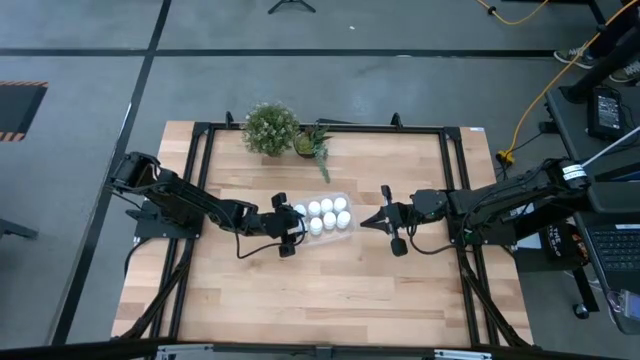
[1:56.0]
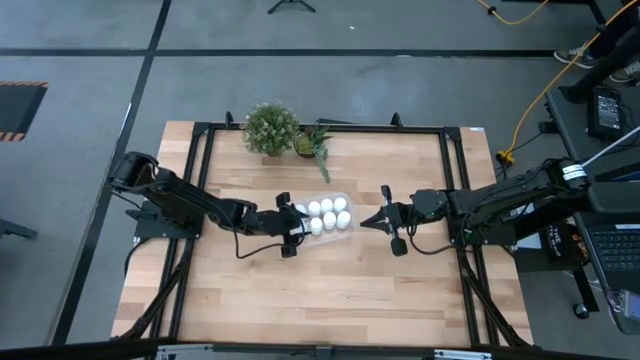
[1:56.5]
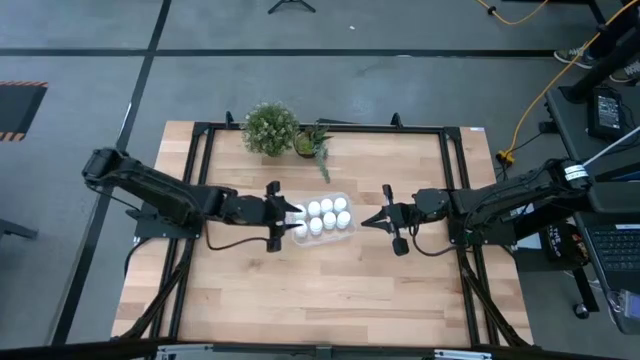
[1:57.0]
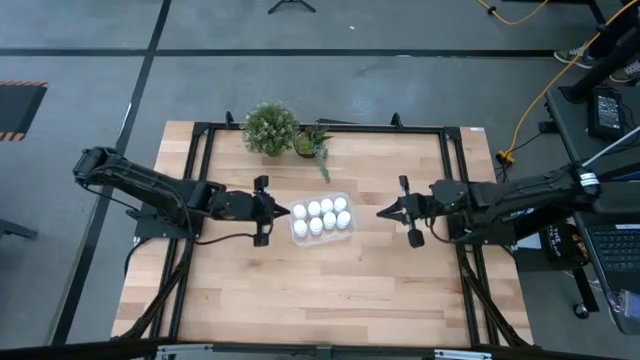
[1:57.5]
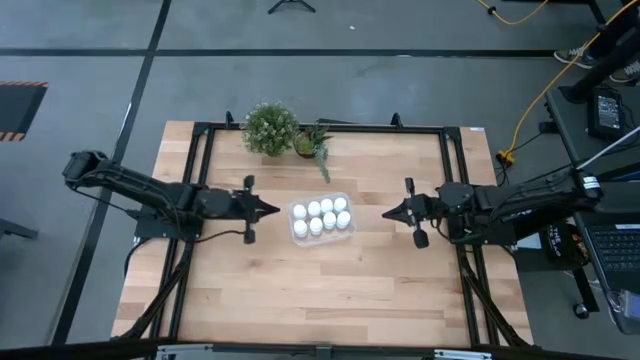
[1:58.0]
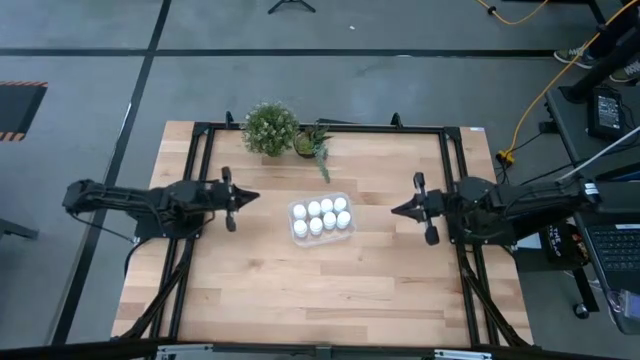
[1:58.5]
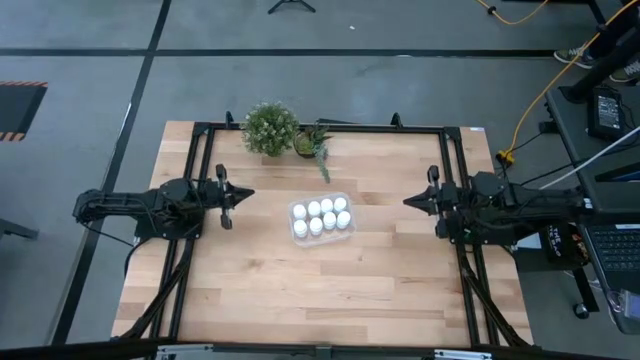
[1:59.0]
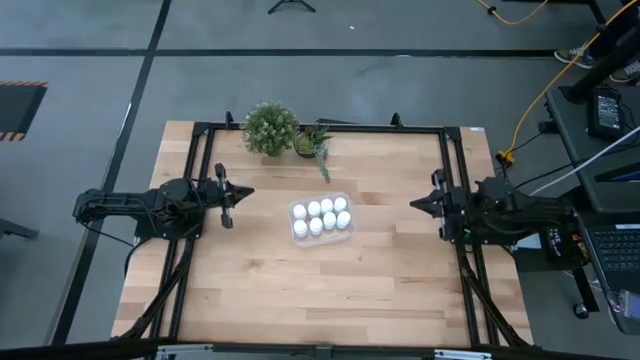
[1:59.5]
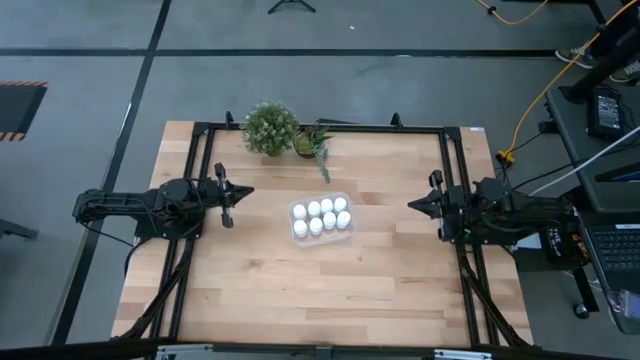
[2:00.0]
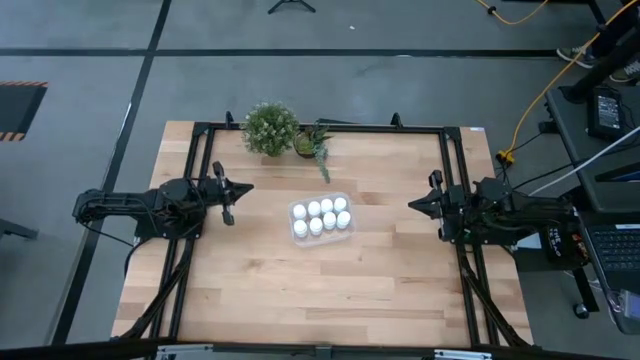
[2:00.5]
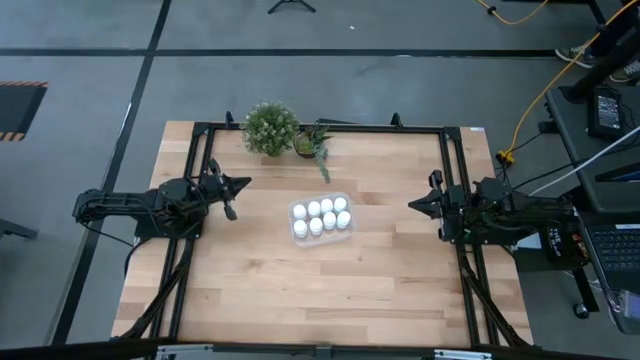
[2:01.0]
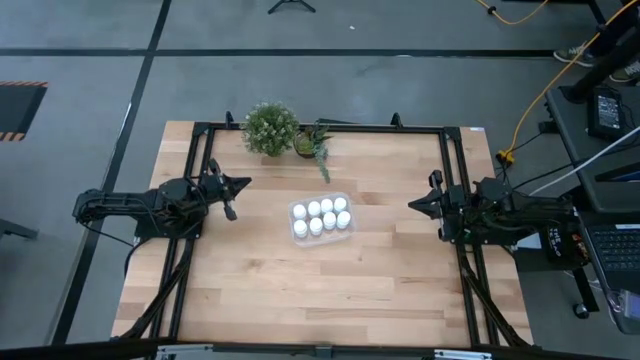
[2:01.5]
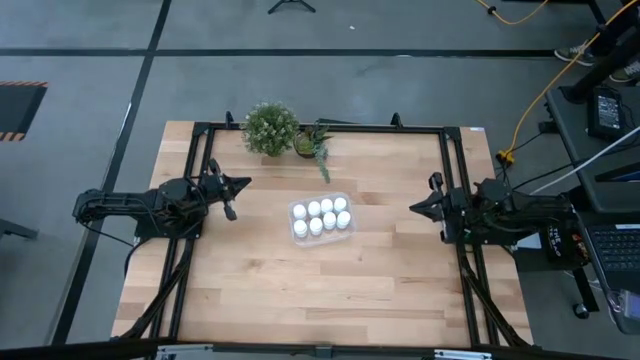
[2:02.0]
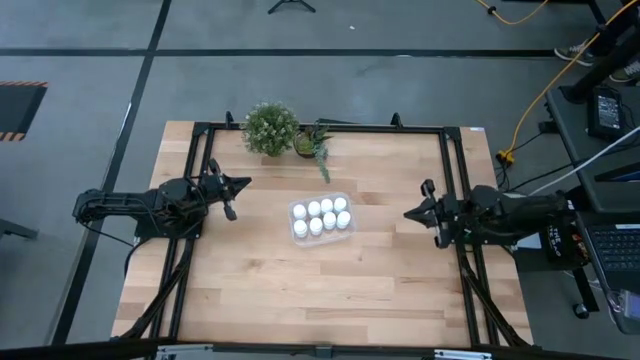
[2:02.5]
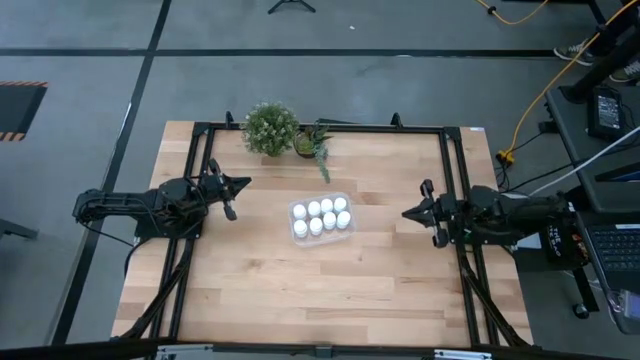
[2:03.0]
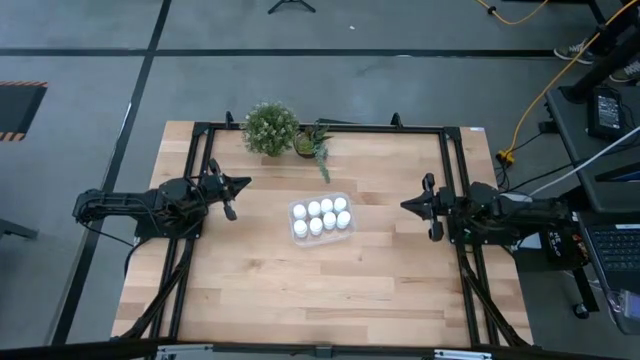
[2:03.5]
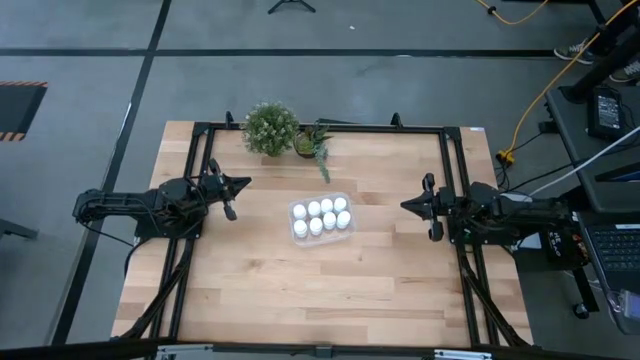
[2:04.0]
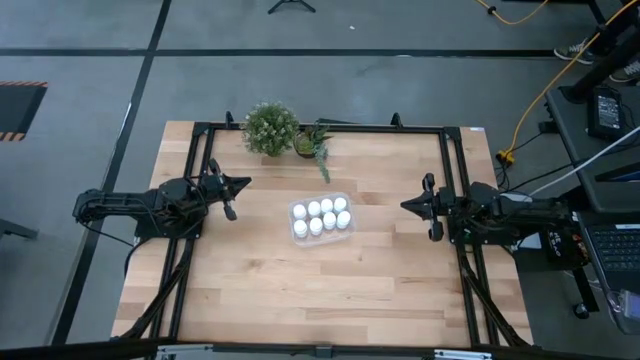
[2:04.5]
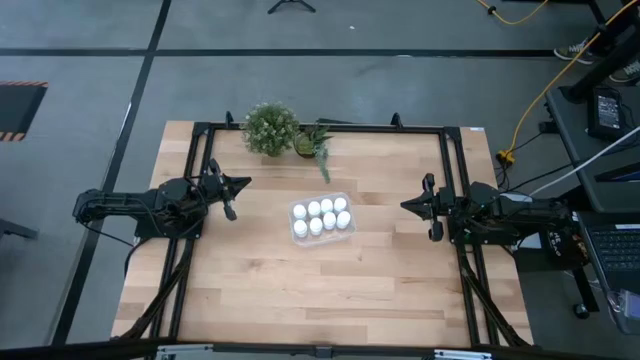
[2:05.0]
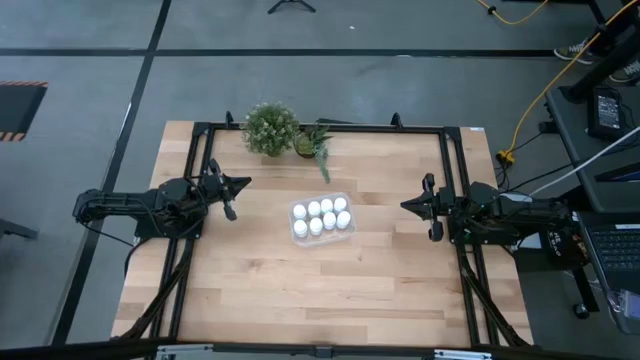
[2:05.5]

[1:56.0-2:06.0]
Task: Pick and place pill bottles into a basket
Return to Home Position

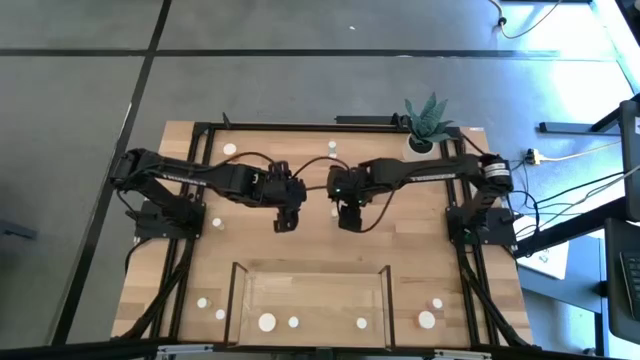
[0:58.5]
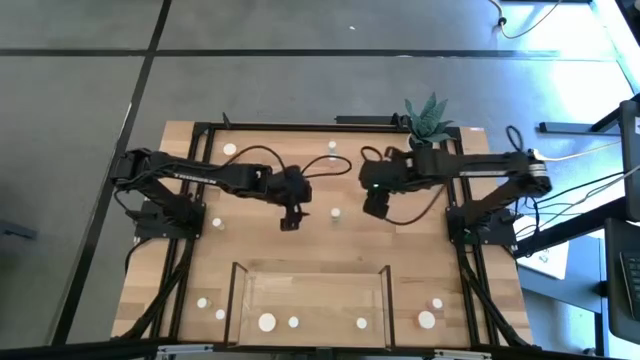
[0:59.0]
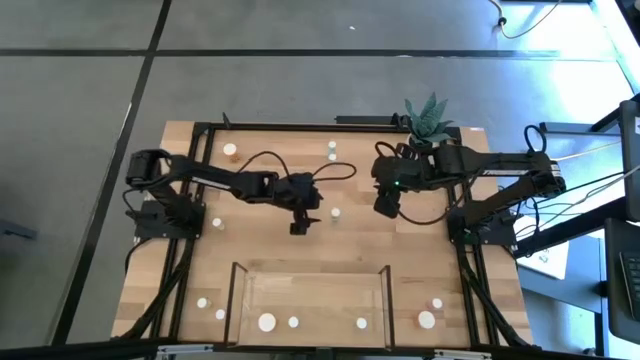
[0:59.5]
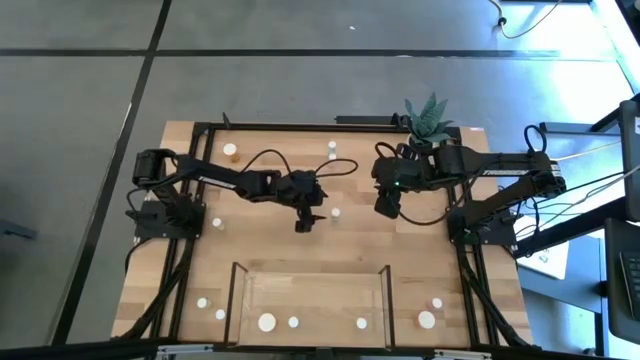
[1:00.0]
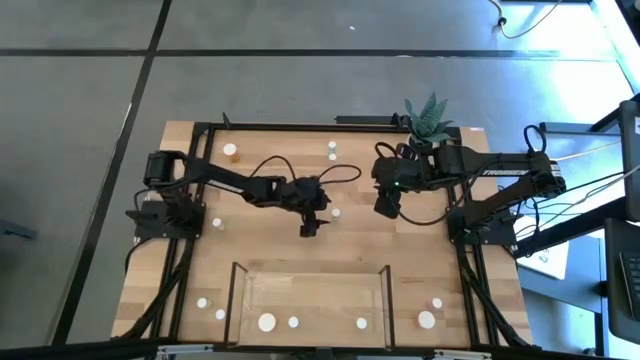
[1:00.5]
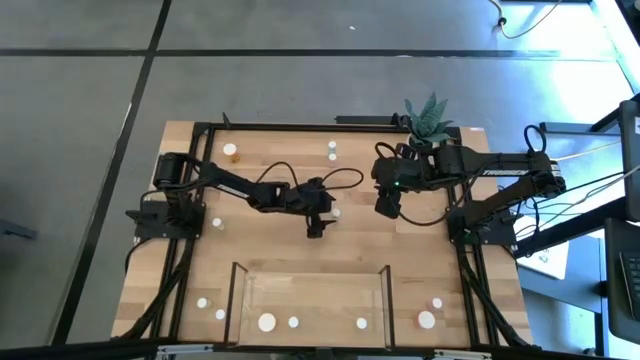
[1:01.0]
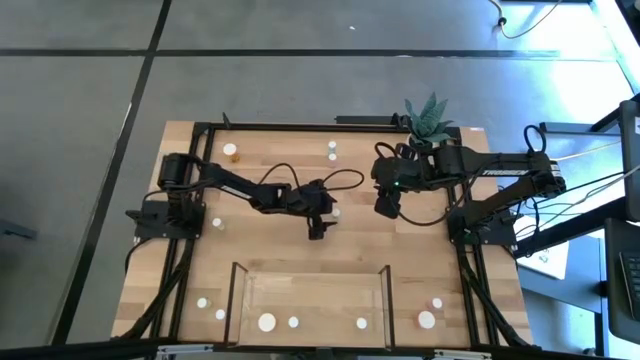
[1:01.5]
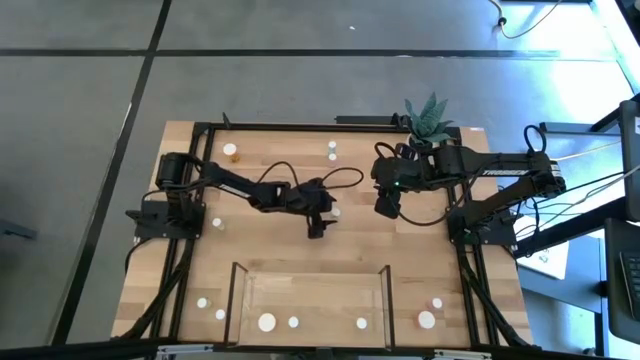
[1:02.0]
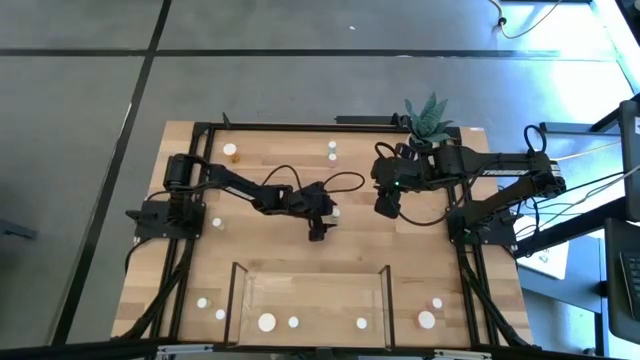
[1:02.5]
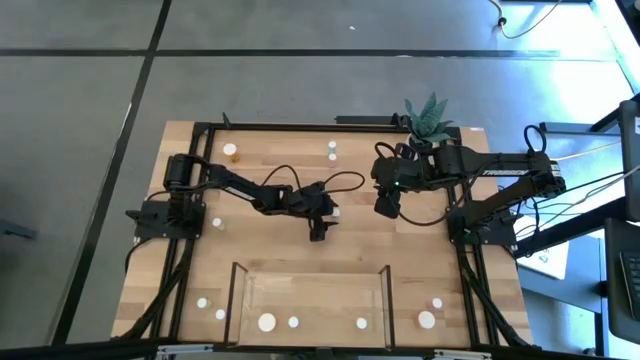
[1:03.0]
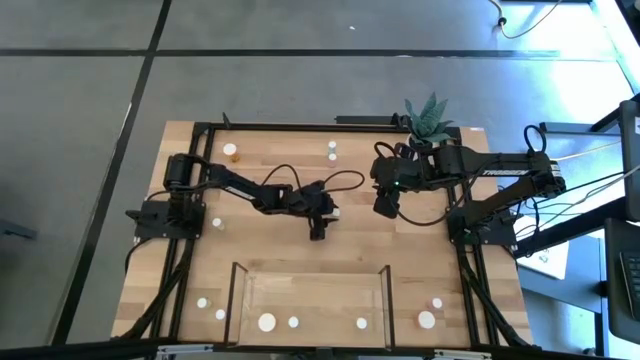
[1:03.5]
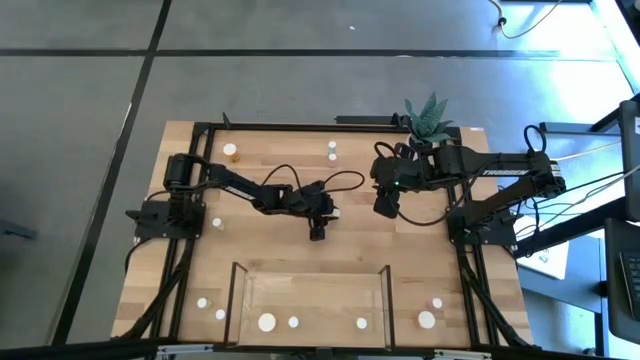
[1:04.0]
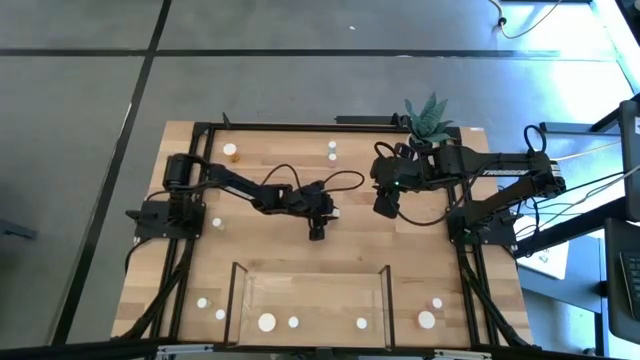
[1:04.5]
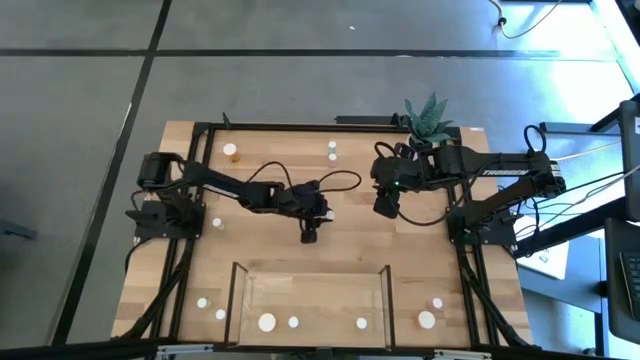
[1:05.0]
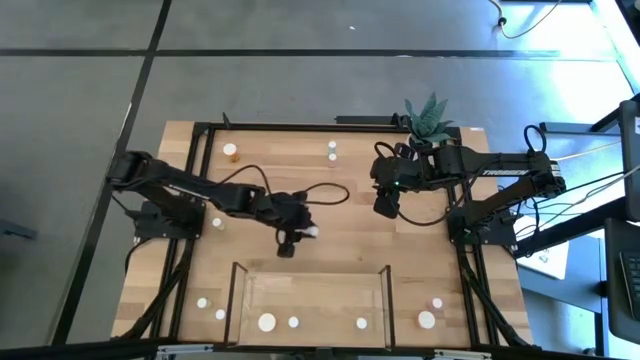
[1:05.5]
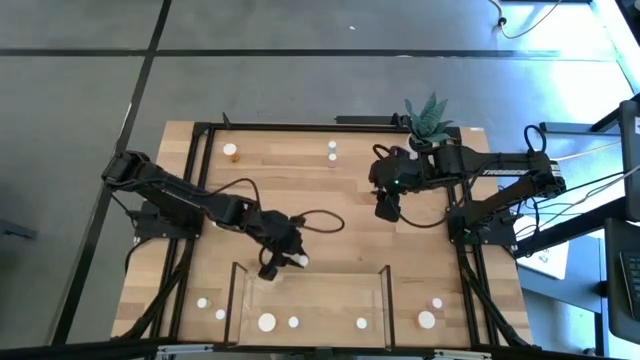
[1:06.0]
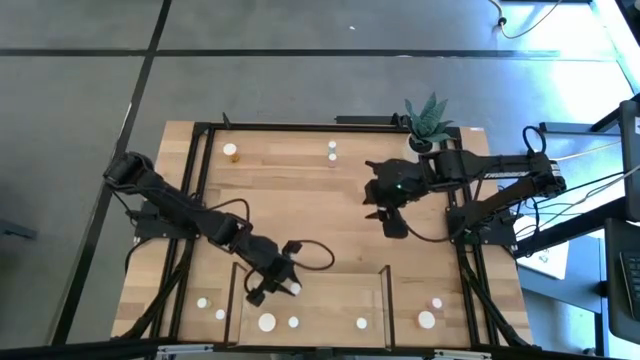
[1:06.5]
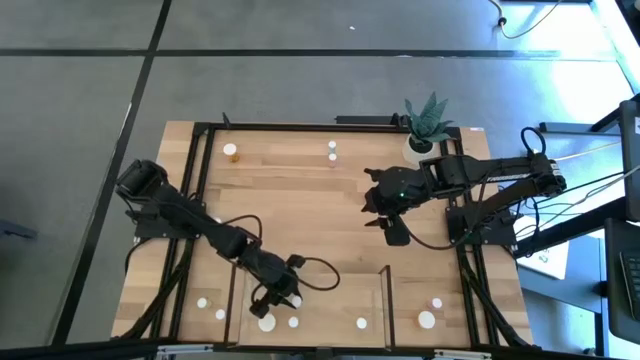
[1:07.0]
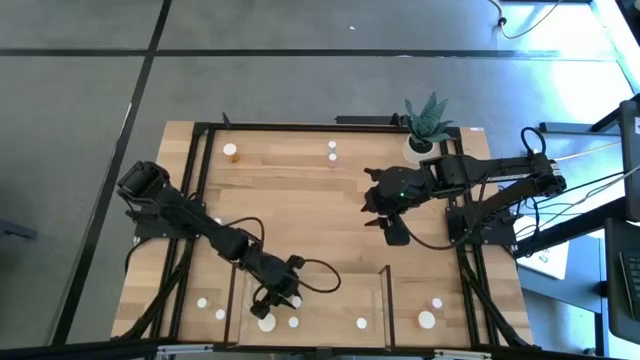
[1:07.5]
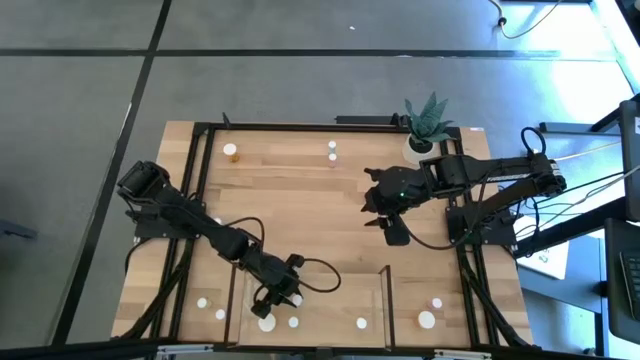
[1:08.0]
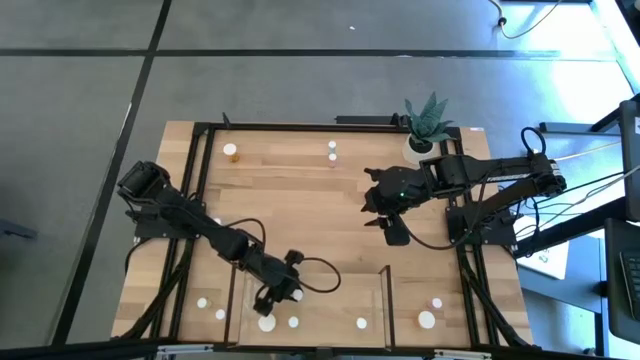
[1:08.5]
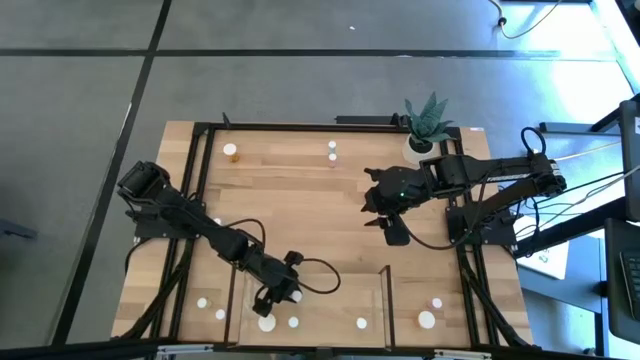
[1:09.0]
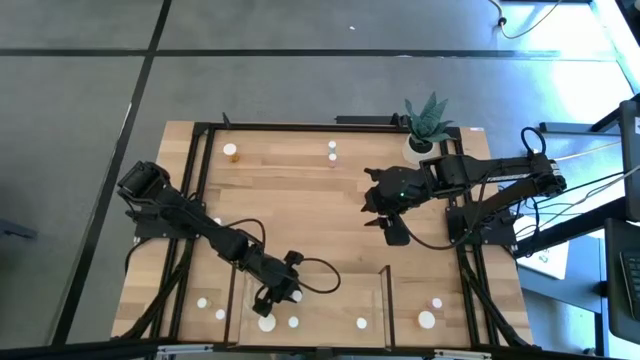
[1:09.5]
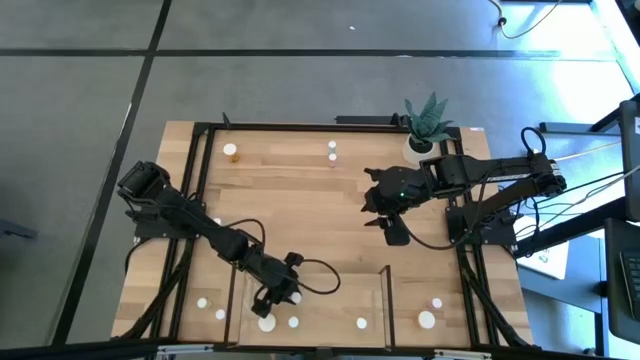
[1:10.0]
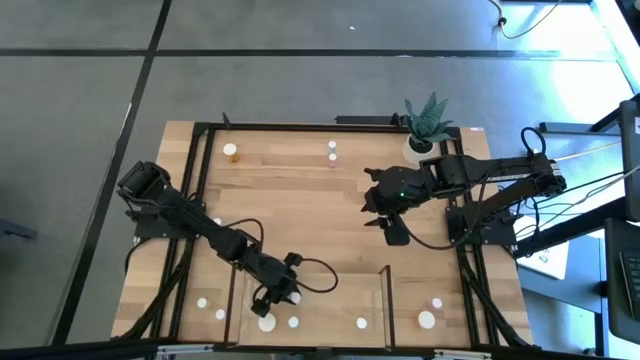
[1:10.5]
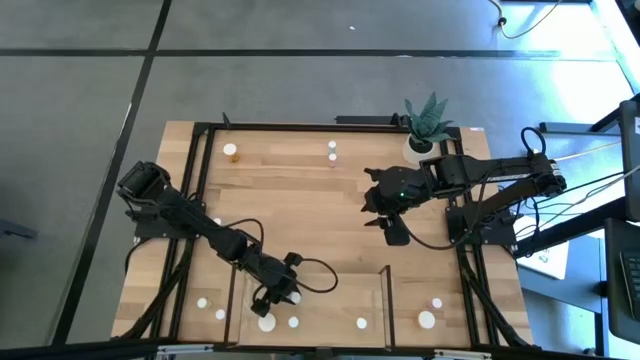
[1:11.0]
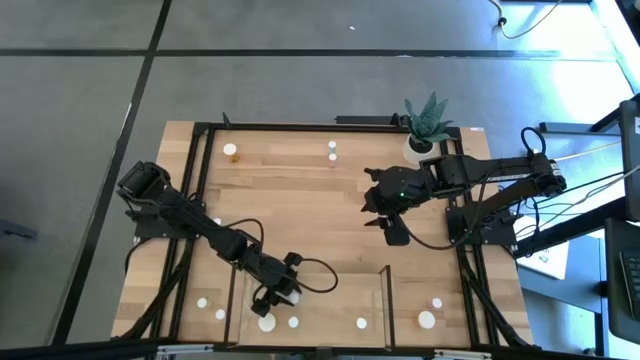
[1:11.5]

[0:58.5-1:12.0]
Task: Pick and place medicine bottles onto shelf by color
Put the bottom blue pill bottle on the shelf aligned with the other blue pill bottle
